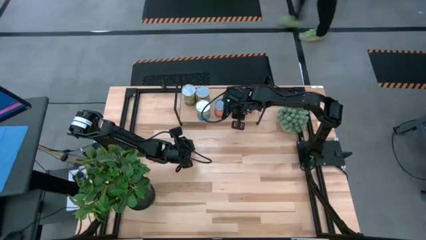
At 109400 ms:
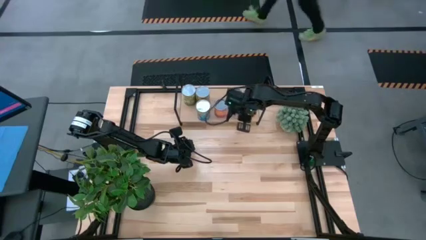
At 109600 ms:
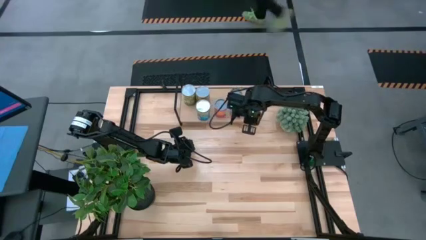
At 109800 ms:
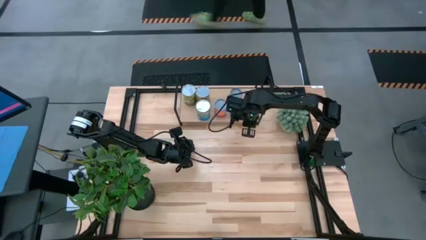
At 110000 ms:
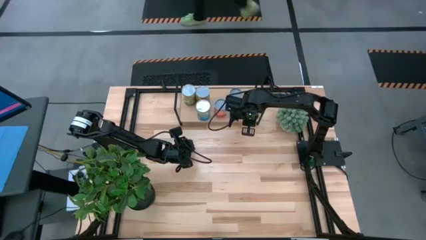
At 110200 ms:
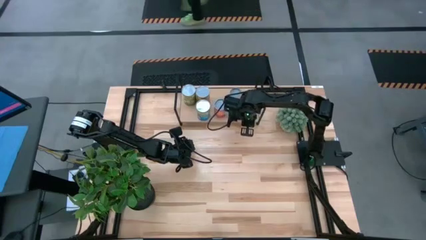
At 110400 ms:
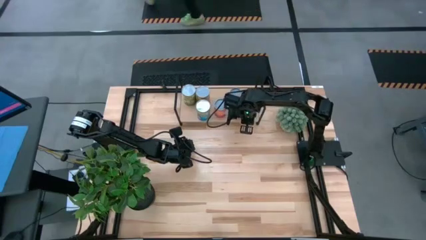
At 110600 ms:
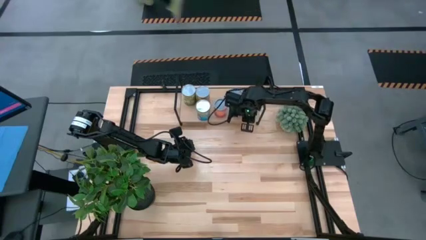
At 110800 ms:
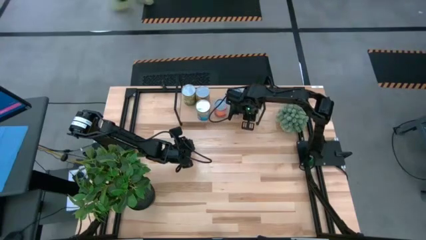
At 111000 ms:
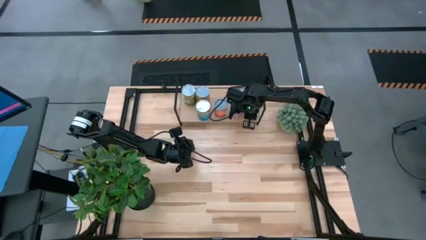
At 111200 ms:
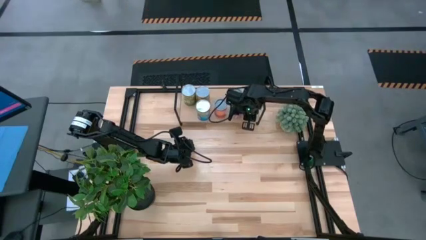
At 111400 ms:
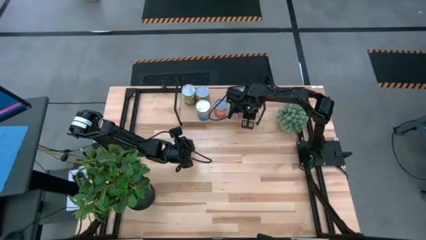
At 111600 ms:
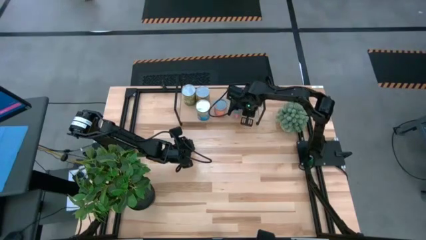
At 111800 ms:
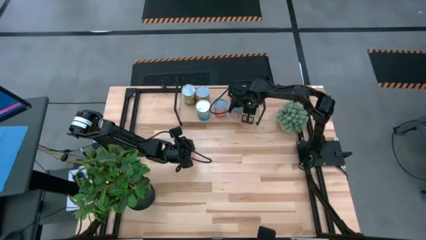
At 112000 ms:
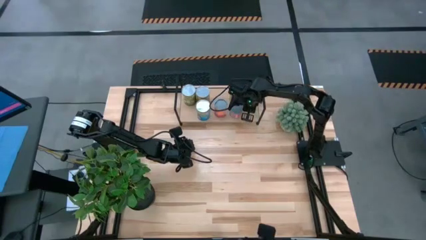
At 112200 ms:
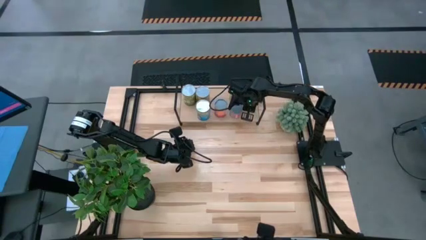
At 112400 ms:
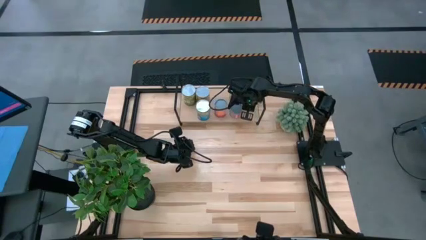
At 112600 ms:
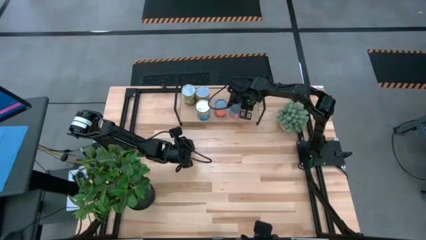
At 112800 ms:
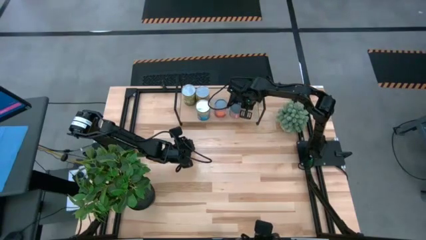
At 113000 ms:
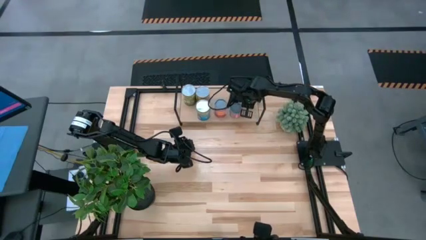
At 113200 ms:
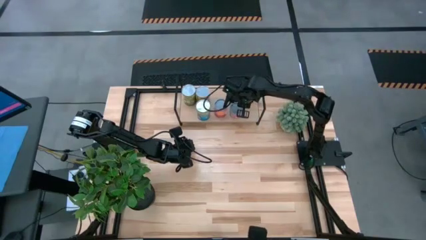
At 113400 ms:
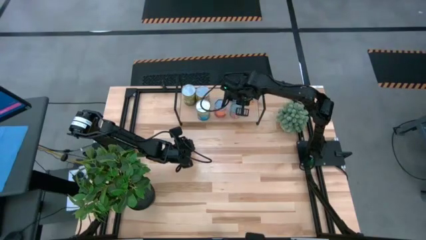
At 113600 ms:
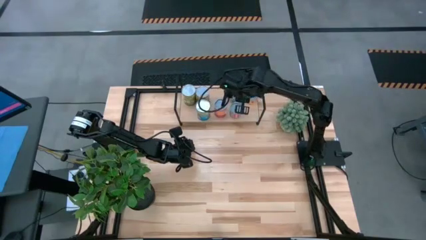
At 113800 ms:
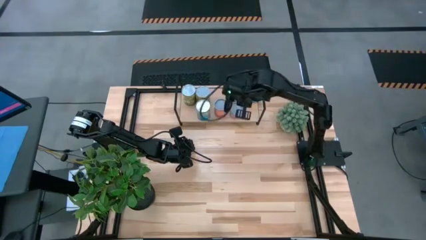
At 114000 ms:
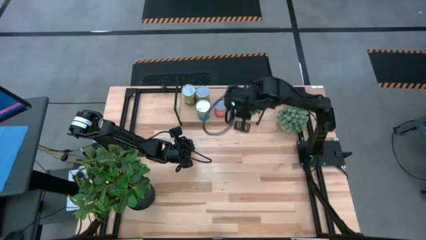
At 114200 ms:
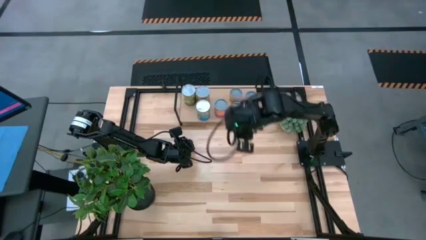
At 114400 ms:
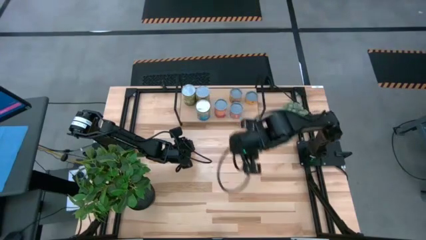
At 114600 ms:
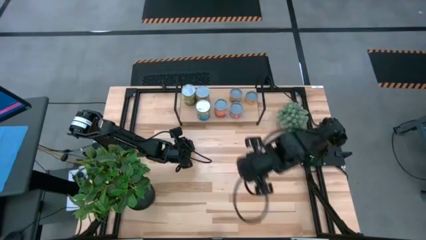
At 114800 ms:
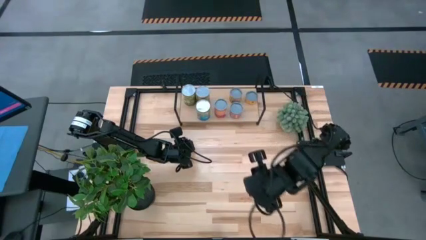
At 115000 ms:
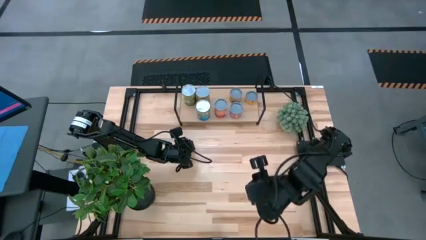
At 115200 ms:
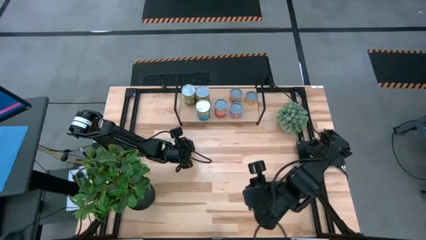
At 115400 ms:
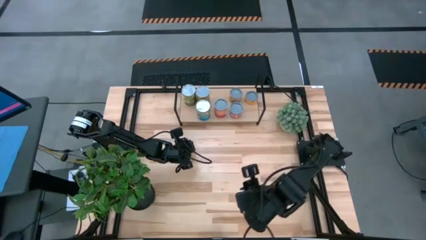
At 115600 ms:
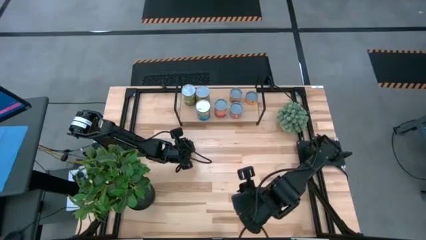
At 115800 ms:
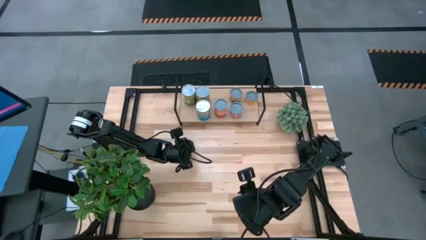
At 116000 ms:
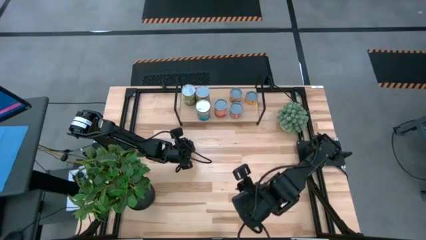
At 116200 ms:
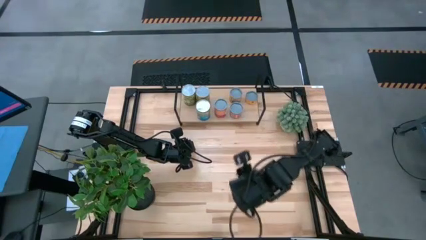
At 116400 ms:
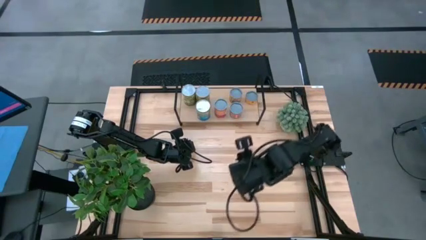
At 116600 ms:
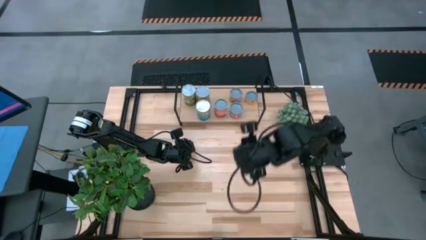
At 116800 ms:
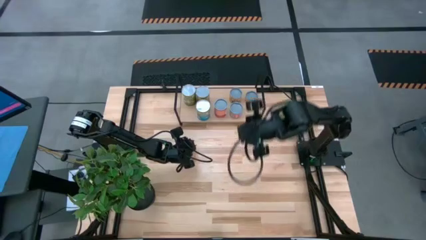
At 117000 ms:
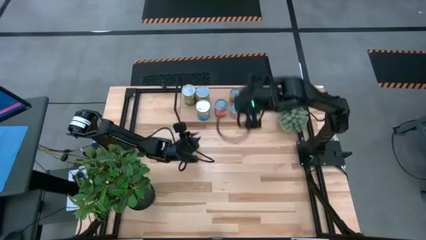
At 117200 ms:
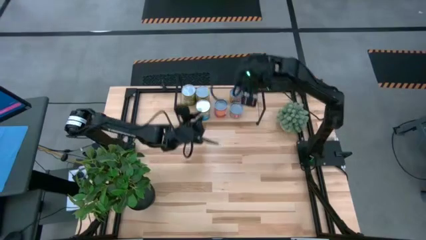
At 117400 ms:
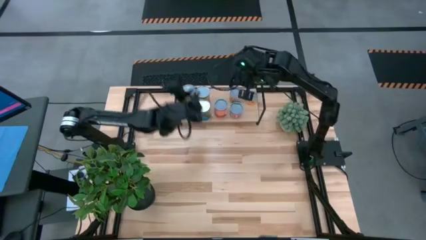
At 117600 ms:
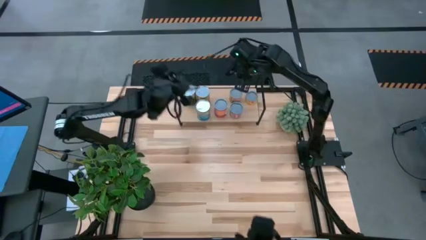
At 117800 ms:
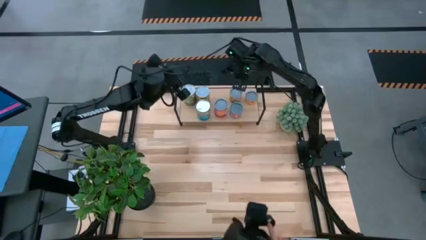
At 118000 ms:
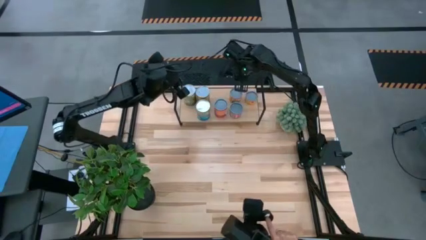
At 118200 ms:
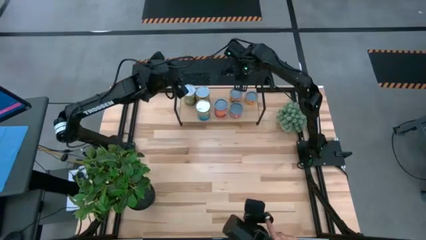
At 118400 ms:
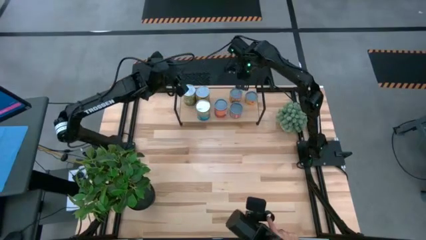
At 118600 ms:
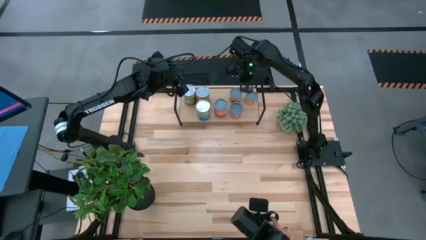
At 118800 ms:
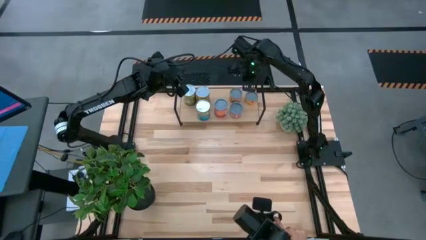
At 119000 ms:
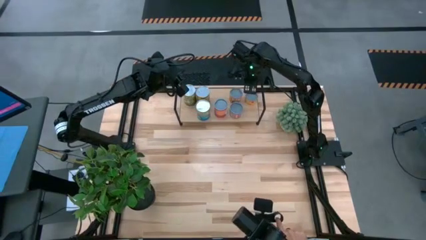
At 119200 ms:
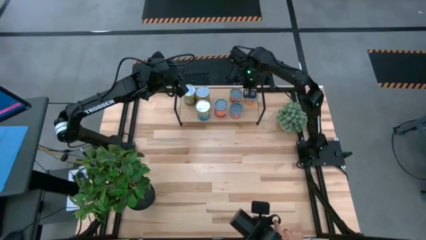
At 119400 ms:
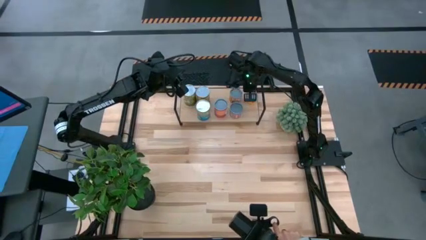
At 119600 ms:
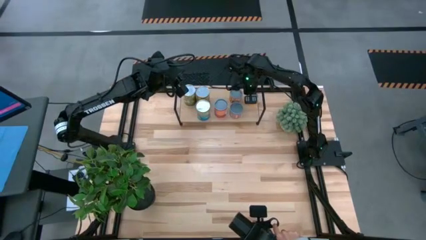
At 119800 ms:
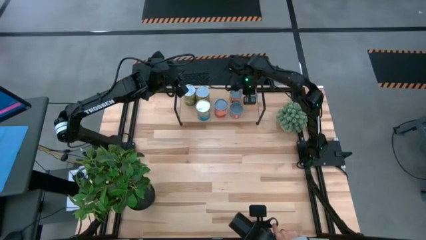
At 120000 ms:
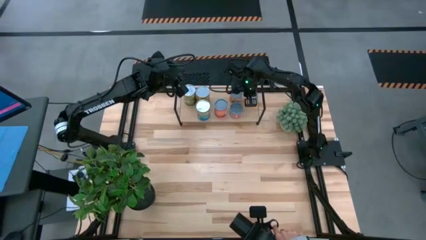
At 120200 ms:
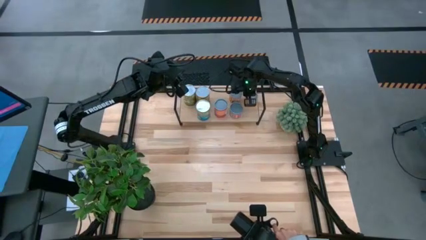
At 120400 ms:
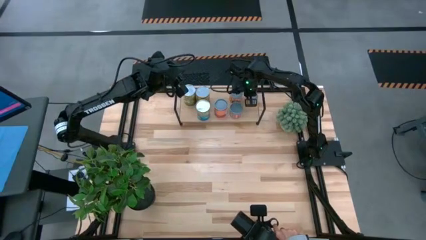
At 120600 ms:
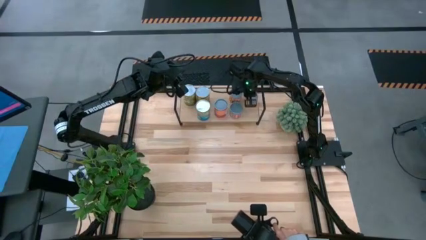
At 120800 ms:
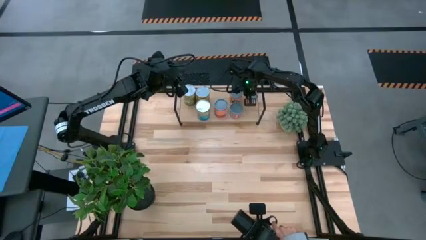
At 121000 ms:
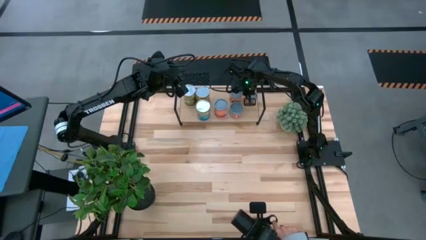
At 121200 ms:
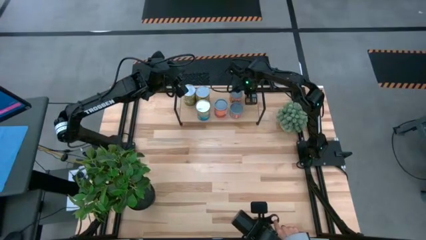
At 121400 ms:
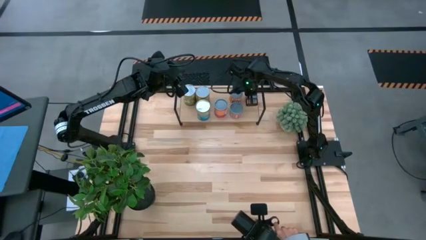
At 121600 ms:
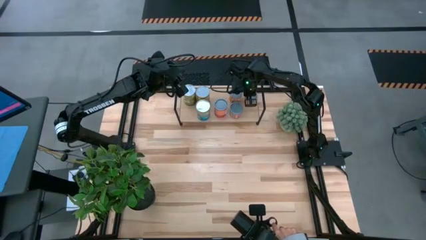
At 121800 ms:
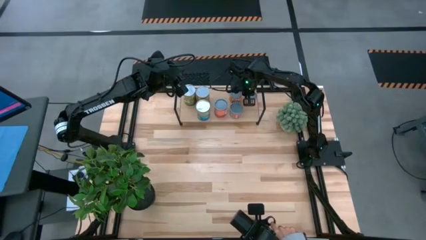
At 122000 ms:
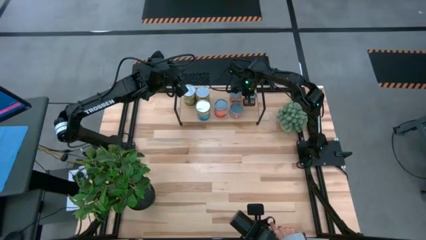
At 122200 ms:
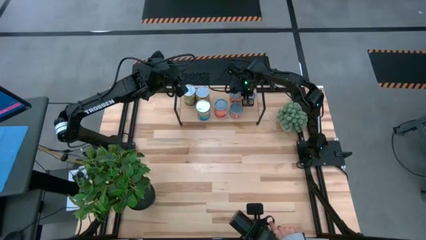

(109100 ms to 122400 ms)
Task: Pick and place cans onto a shelf
Adjust the canned oranges on the shelf
